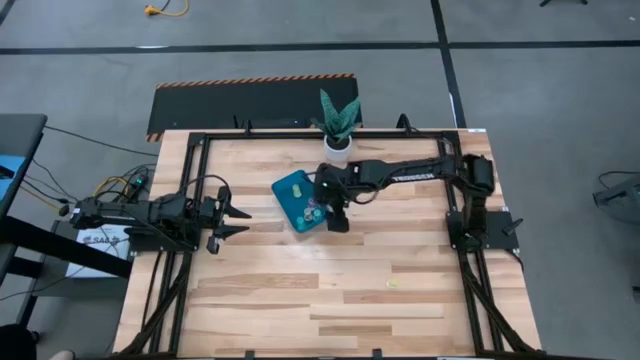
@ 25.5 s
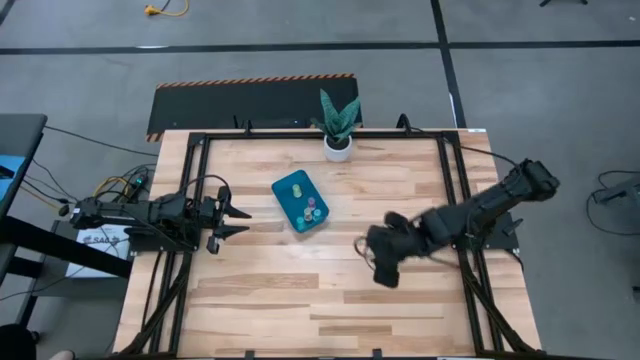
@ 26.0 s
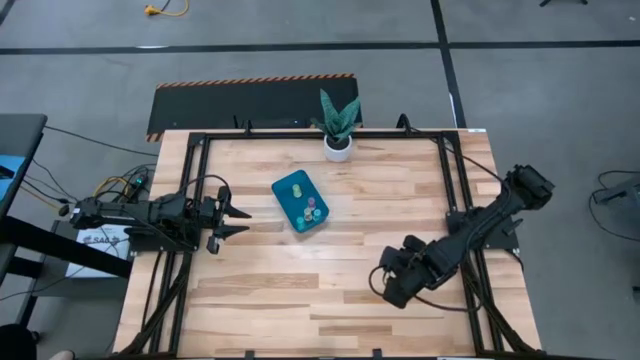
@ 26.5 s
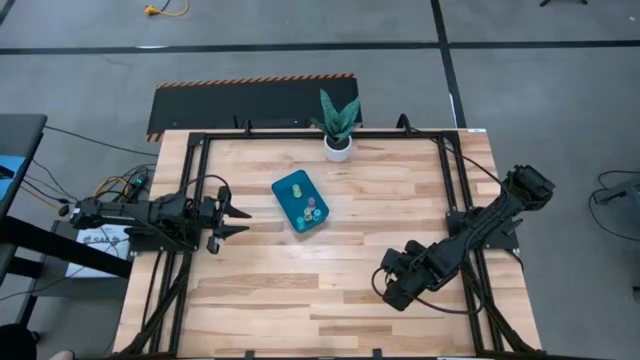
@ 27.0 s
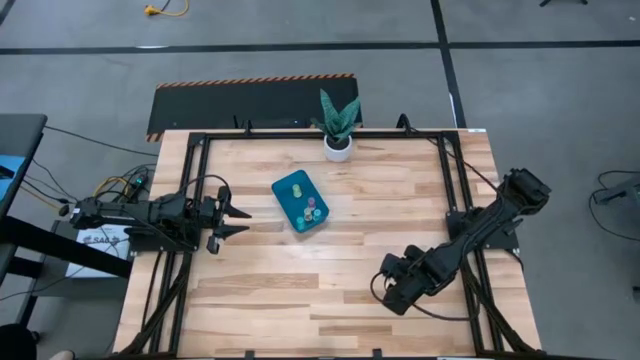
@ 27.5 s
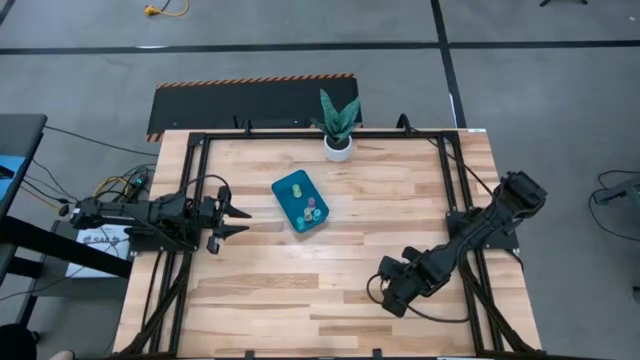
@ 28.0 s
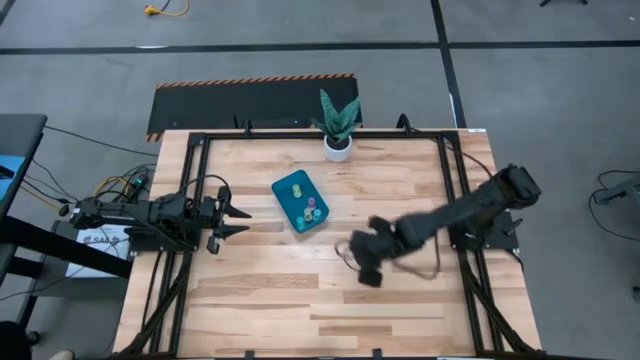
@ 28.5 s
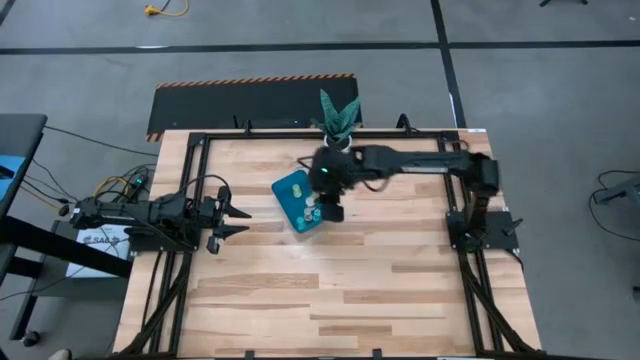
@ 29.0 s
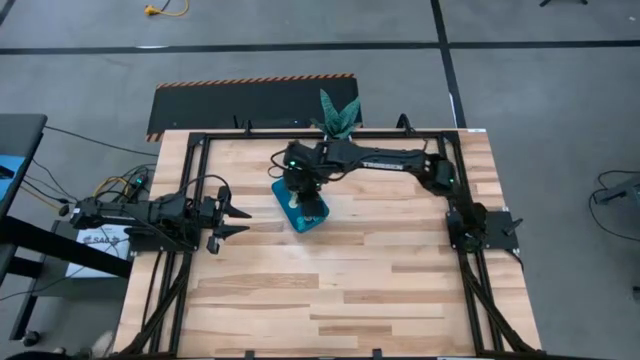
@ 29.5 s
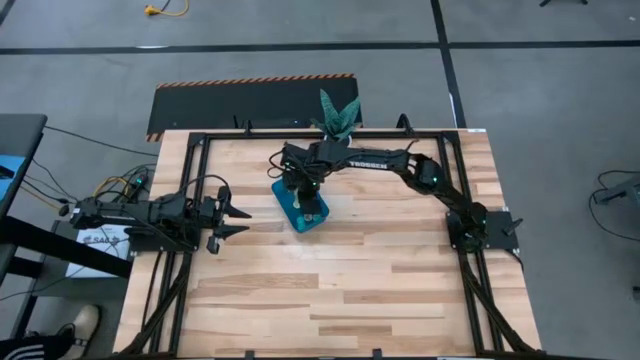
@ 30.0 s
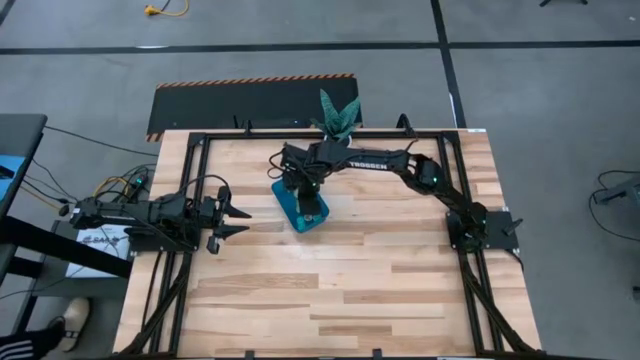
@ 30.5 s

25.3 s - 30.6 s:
Task: Pick and place pill bottles into a basket
Put the yellow medicine bottle into the blue bin

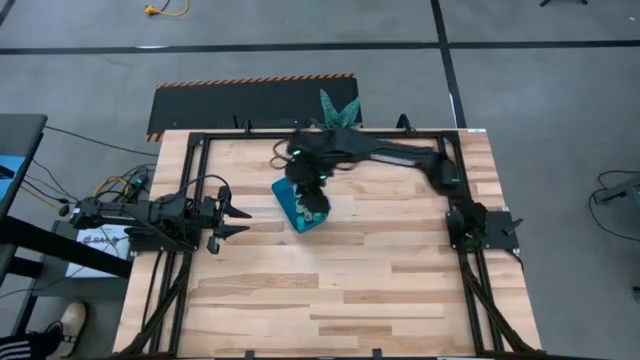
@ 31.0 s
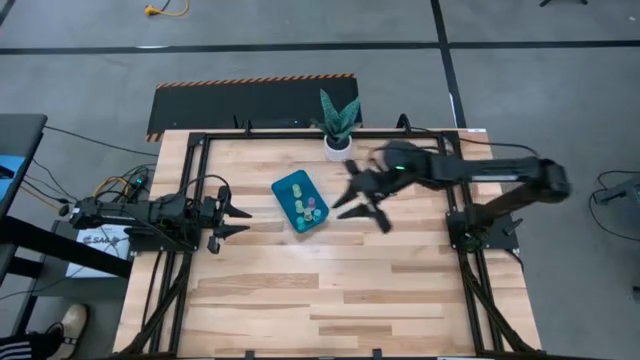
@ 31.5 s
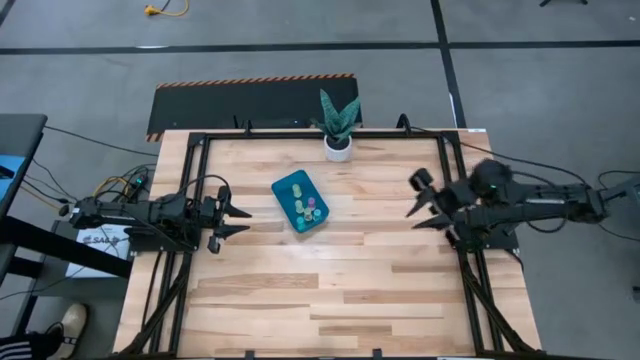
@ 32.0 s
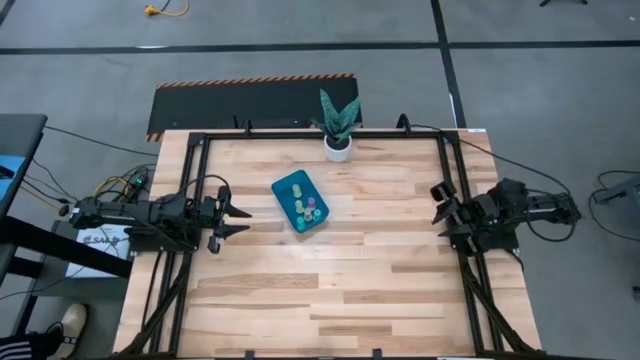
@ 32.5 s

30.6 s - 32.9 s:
Return to Home Position

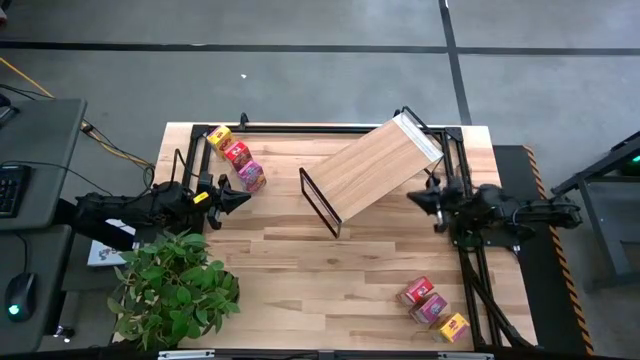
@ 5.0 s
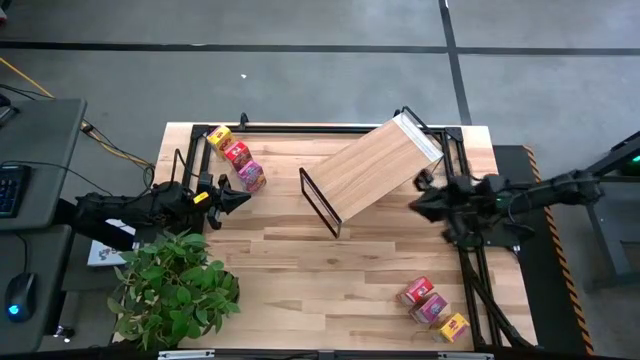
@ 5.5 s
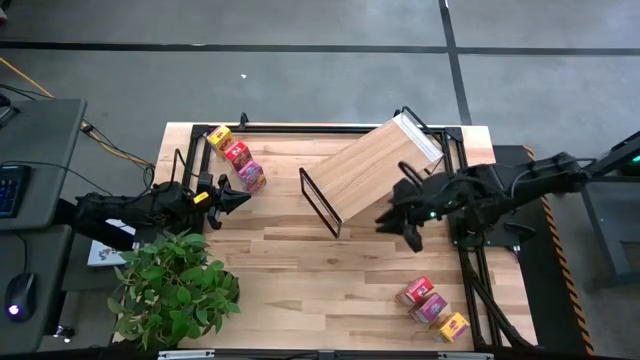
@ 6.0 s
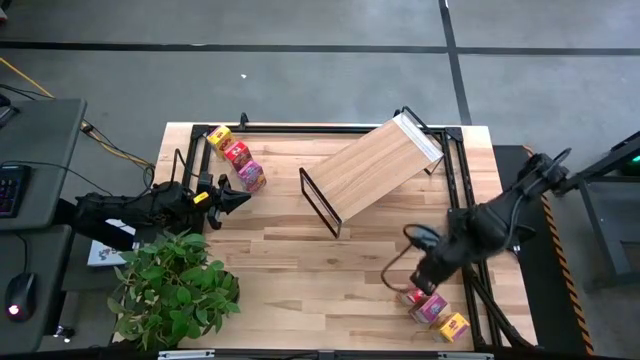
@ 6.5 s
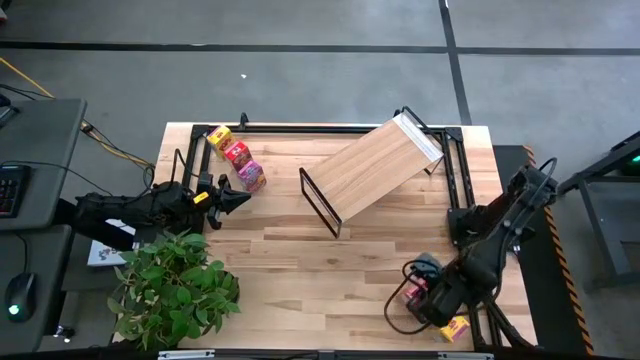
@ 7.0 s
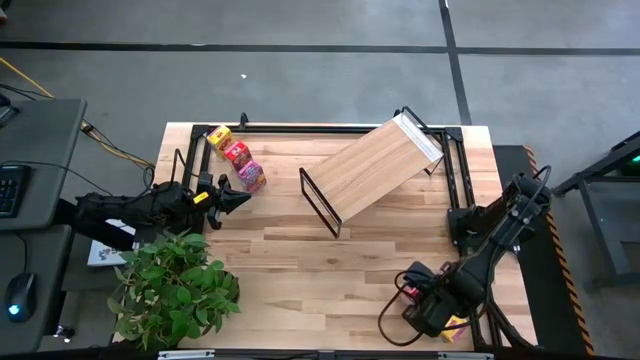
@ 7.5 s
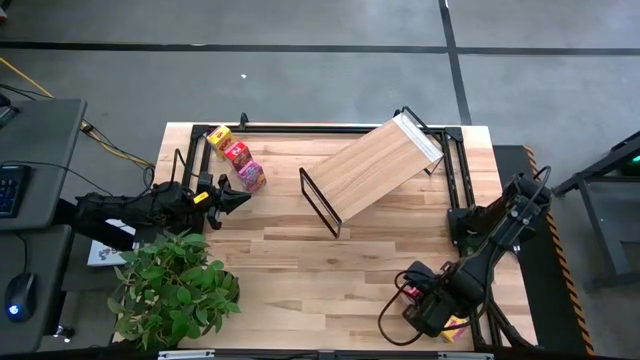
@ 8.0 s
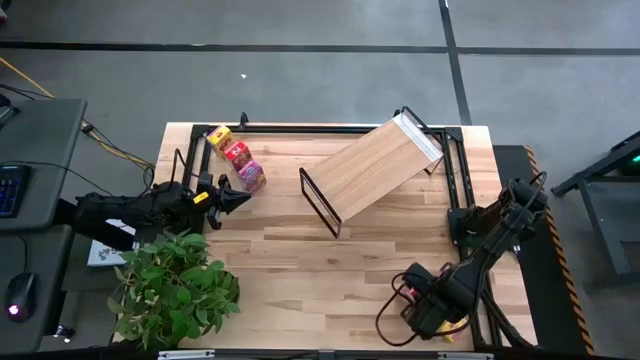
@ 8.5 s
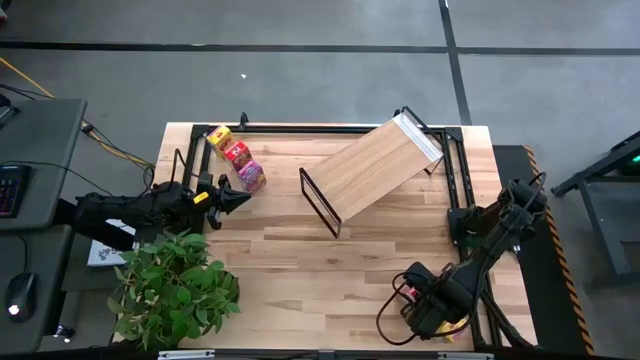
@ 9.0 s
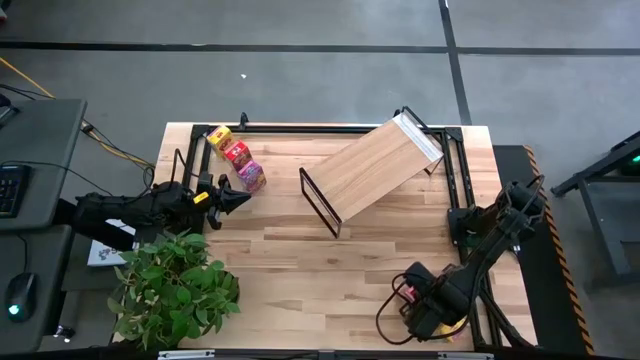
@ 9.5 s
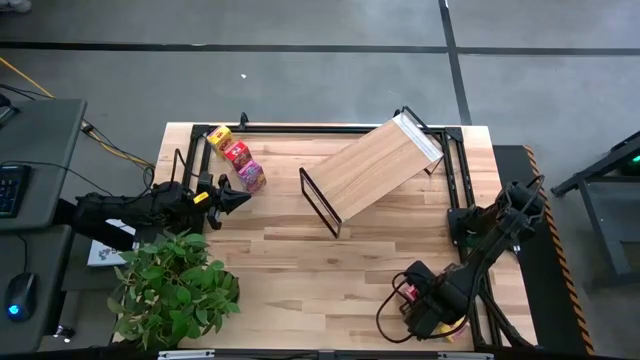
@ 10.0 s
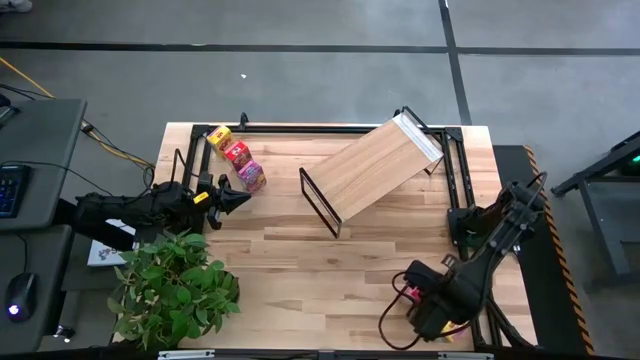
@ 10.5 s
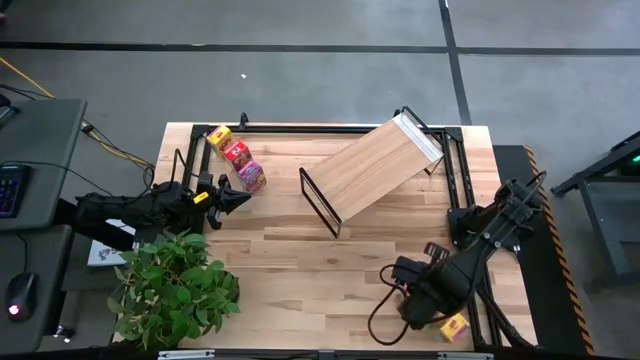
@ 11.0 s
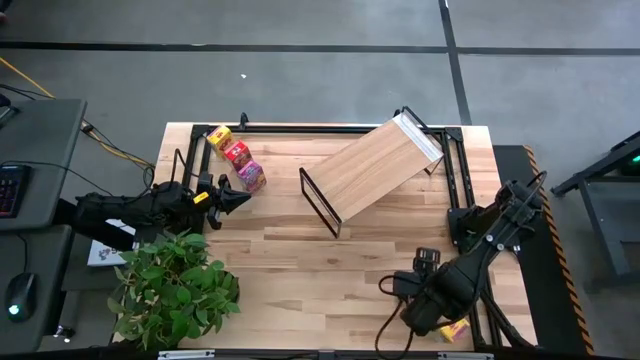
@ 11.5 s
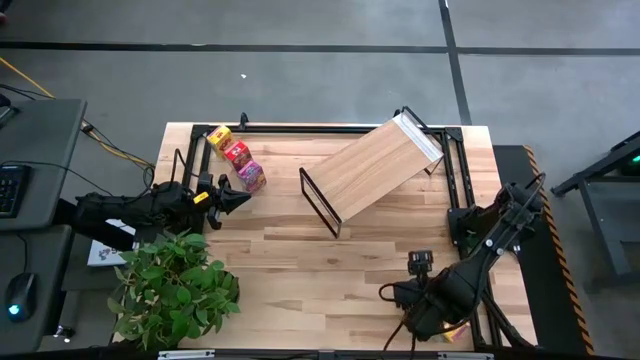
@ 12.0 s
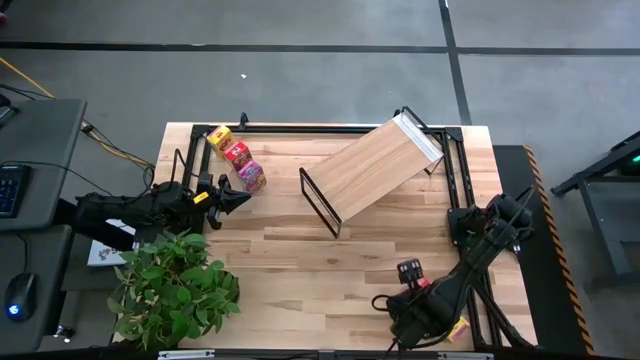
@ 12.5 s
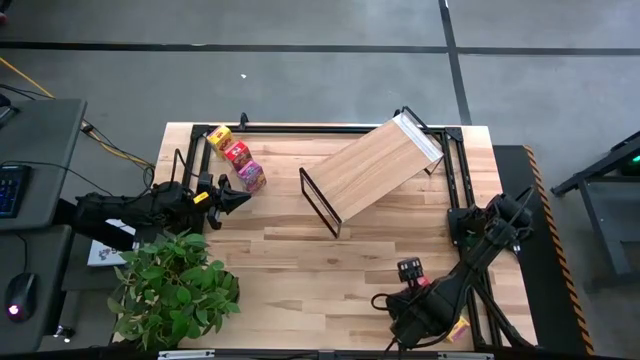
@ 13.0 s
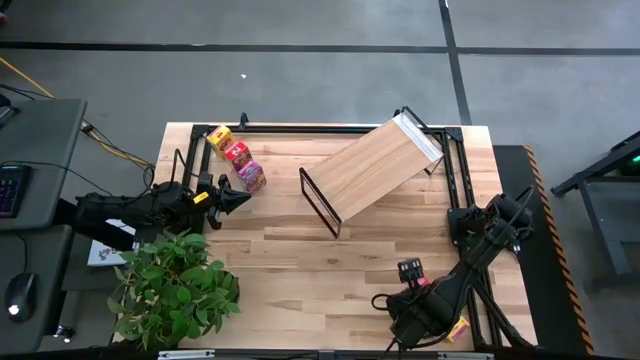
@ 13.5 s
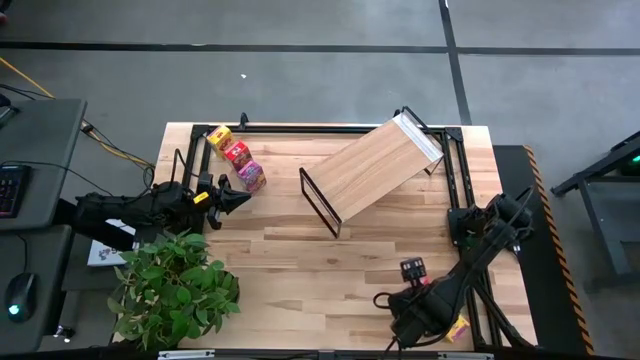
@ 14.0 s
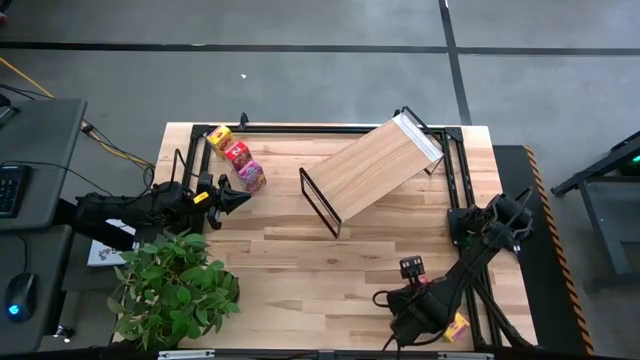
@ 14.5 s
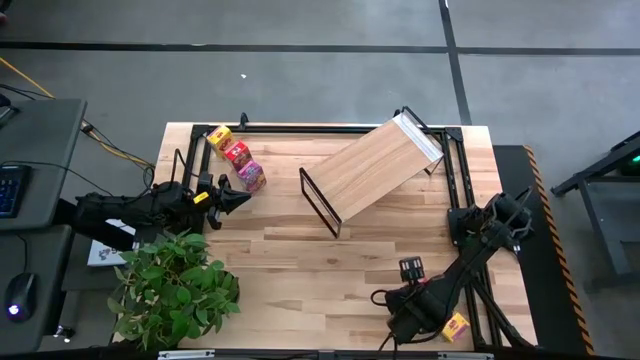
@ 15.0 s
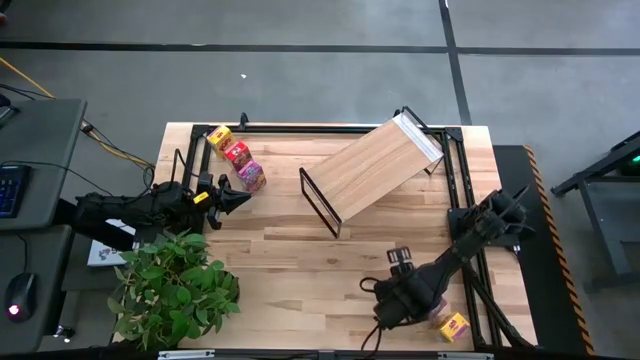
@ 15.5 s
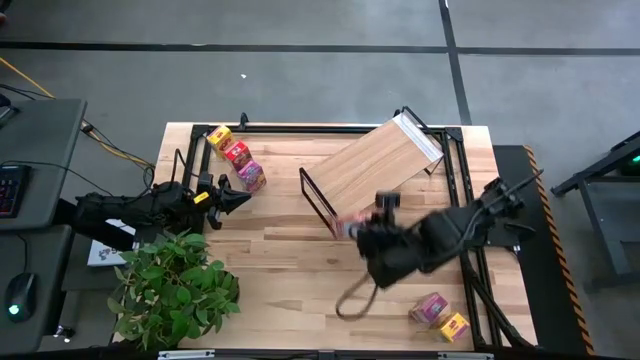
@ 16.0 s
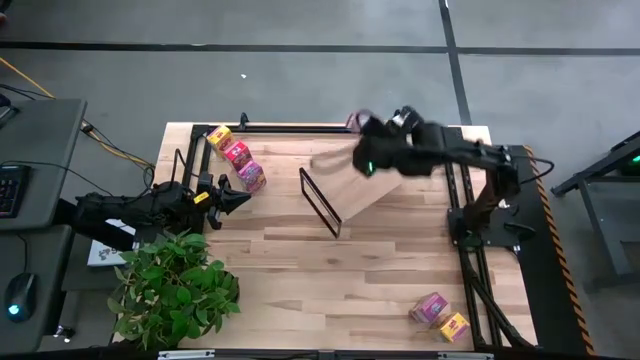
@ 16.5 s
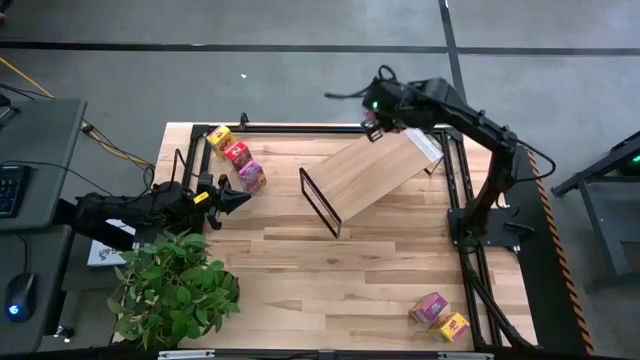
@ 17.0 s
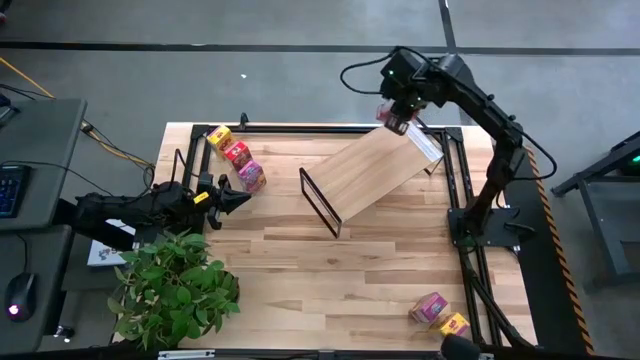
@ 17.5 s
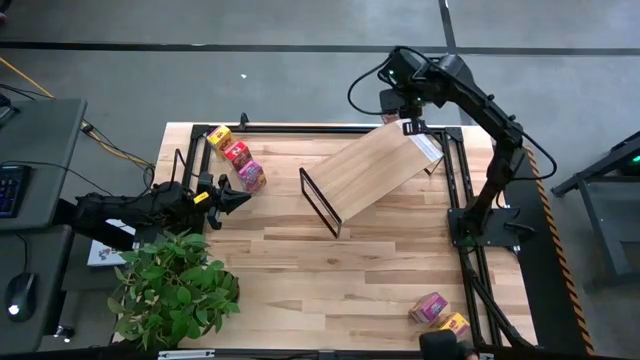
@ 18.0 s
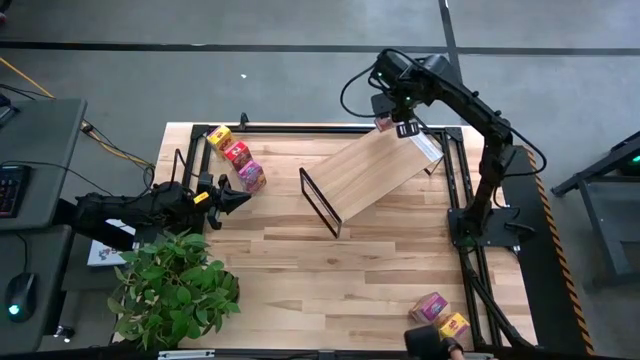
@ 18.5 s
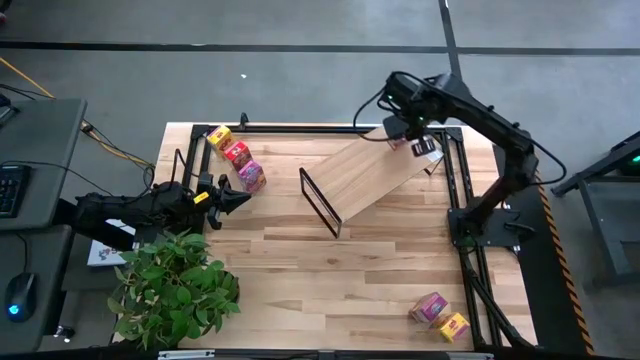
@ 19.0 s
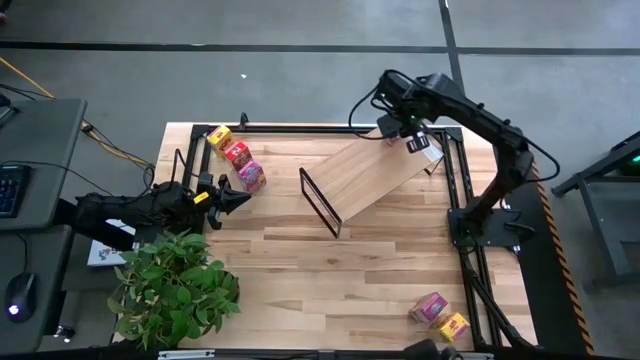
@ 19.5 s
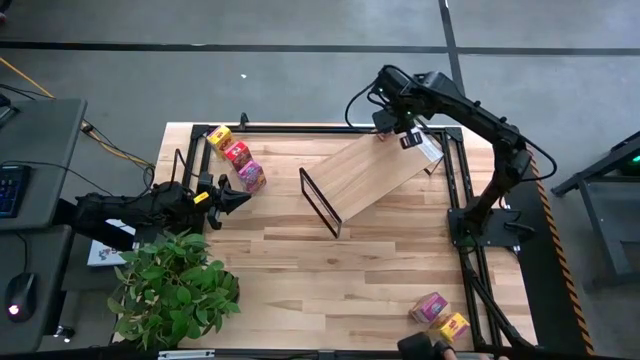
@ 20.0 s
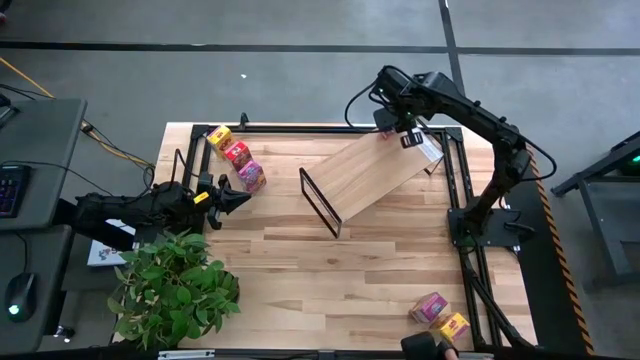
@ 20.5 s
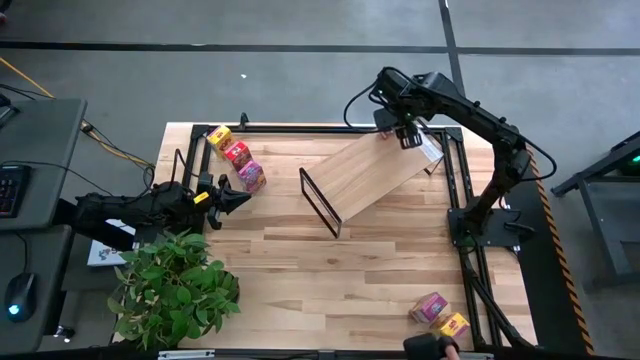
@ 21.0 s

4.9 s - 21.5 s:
Task: Stack cereal on shelf
Put the bottom red cereal box on the shelf
